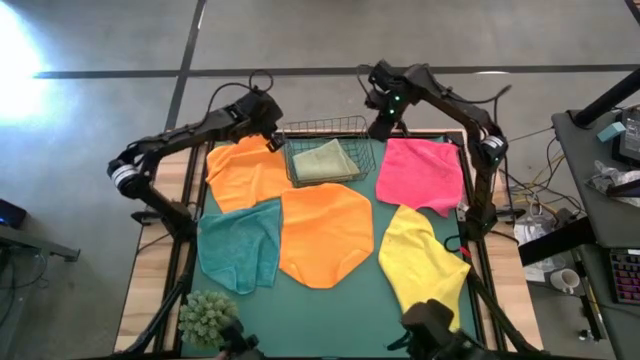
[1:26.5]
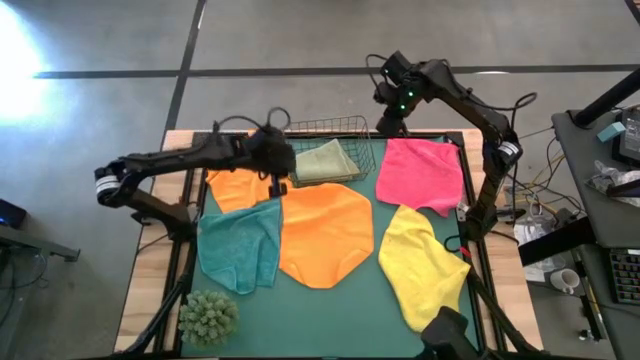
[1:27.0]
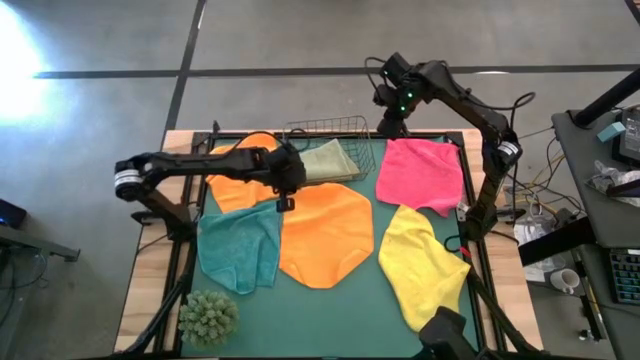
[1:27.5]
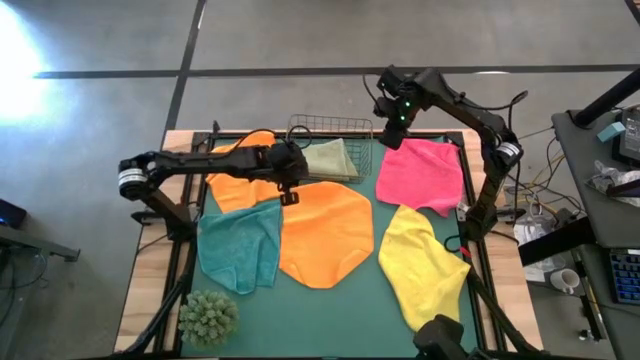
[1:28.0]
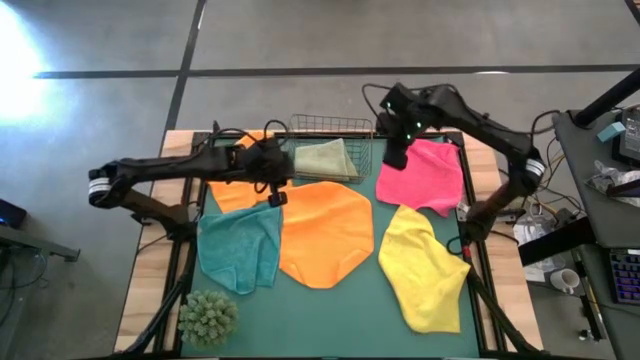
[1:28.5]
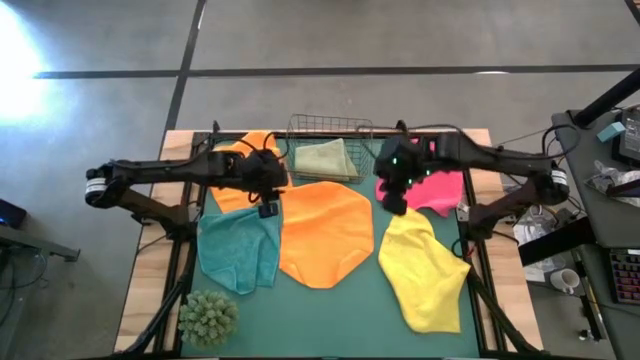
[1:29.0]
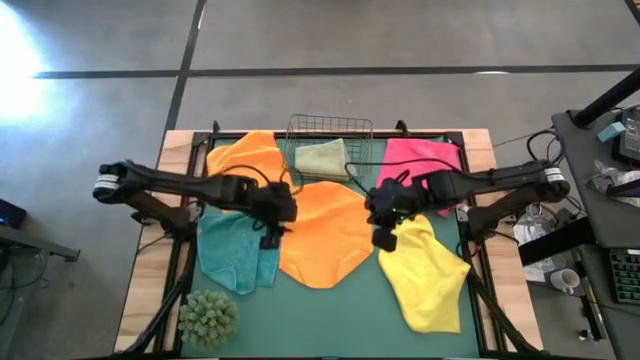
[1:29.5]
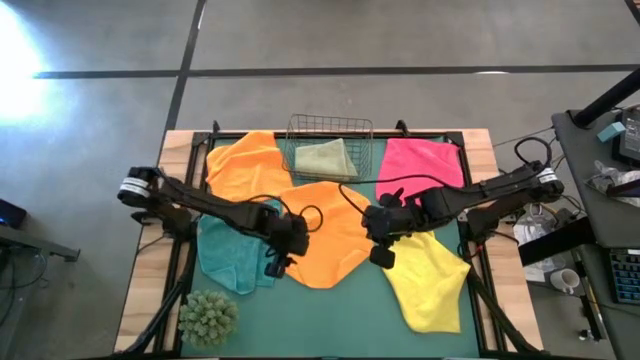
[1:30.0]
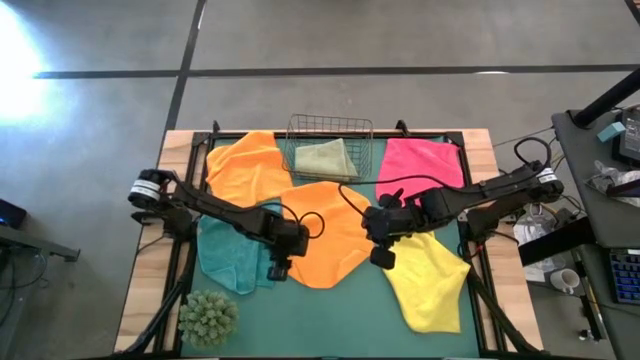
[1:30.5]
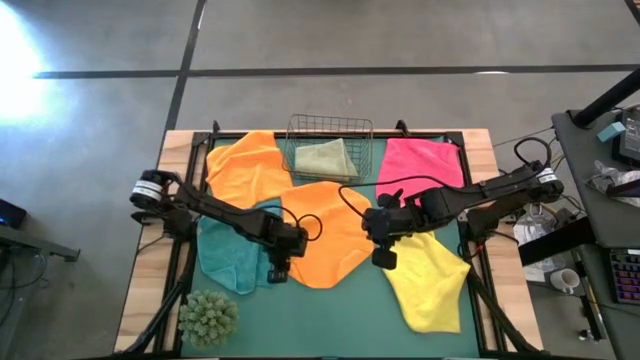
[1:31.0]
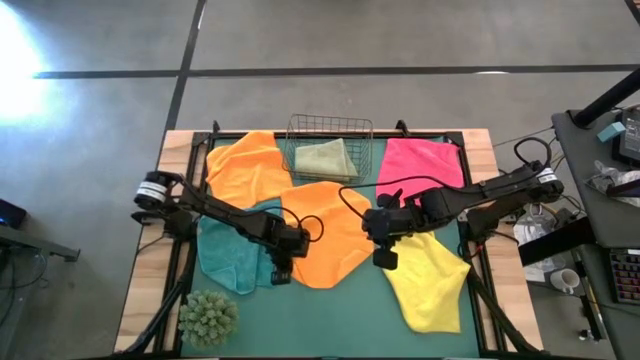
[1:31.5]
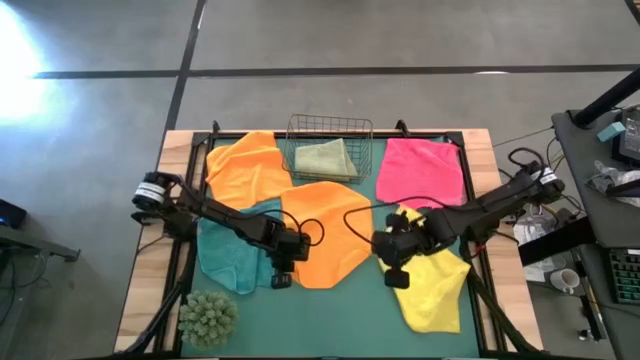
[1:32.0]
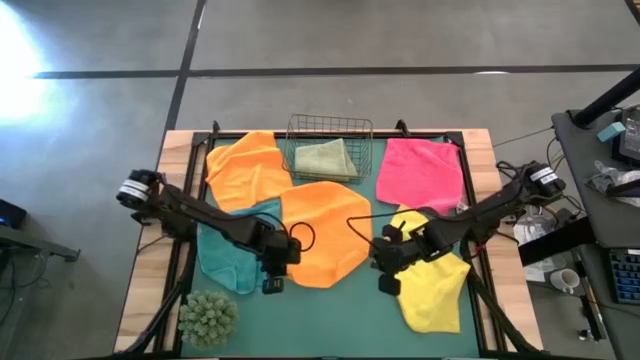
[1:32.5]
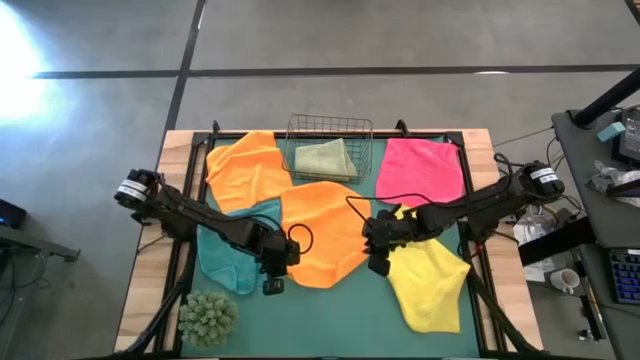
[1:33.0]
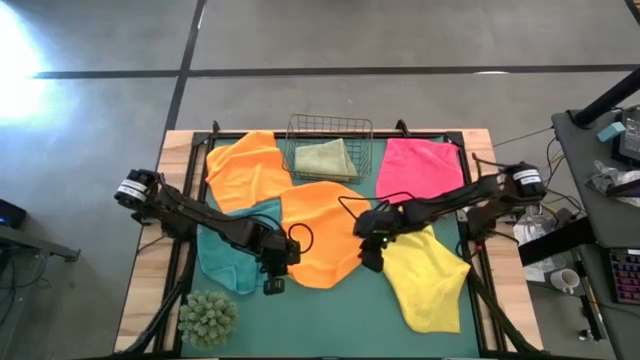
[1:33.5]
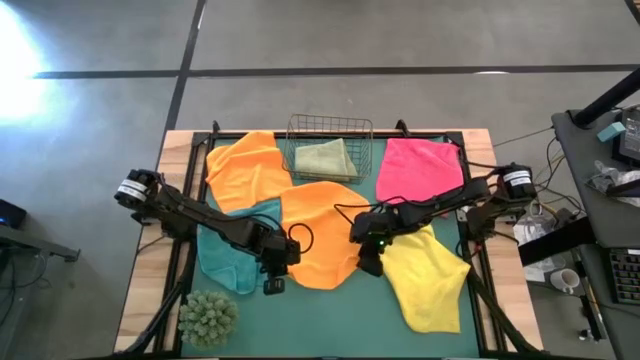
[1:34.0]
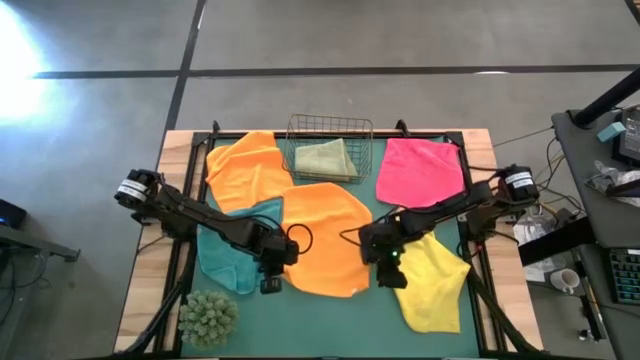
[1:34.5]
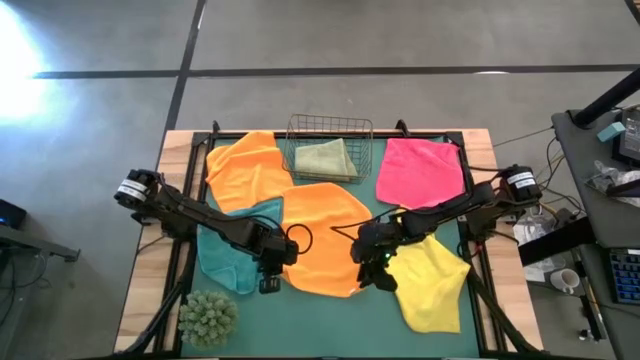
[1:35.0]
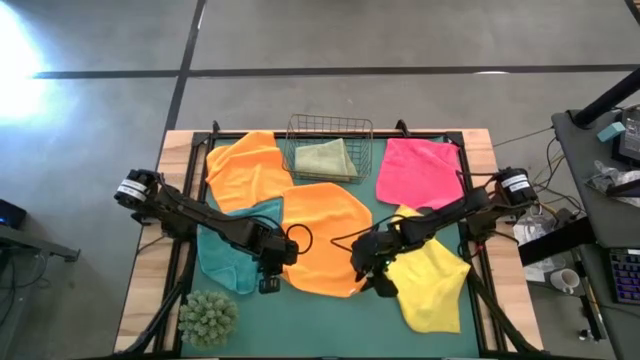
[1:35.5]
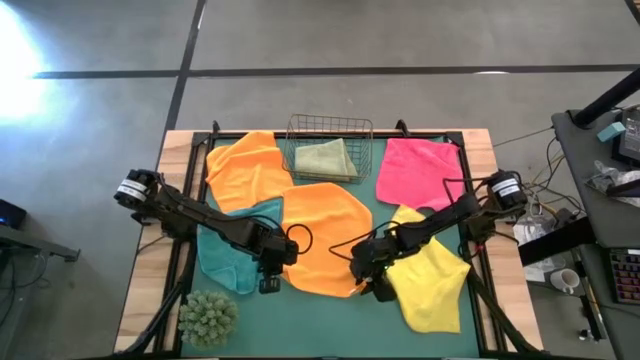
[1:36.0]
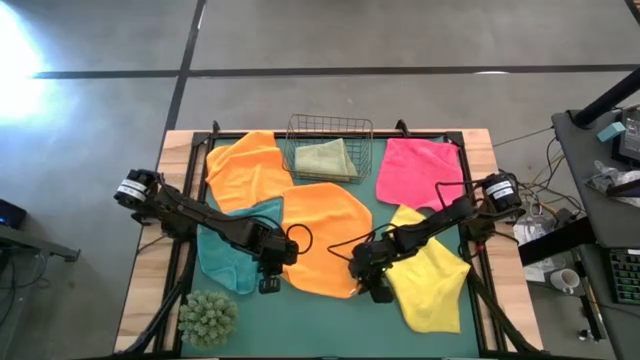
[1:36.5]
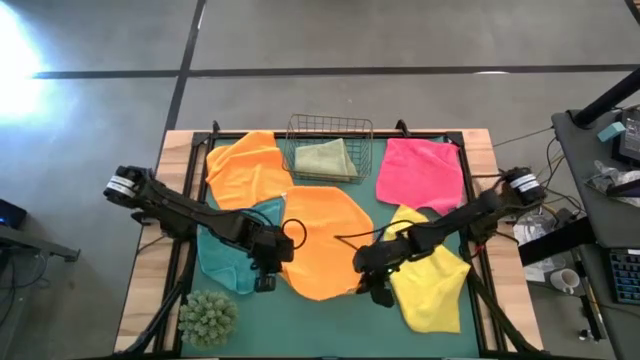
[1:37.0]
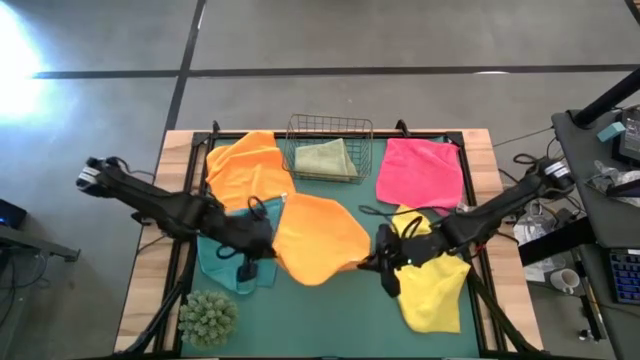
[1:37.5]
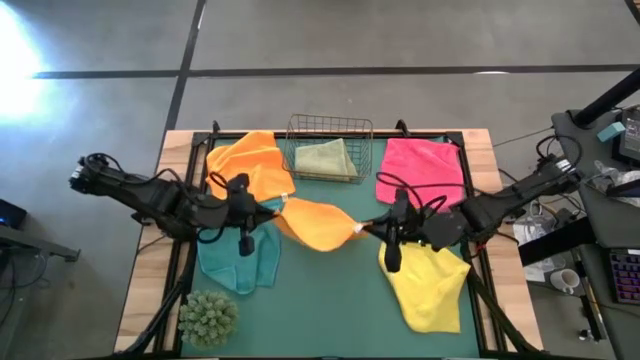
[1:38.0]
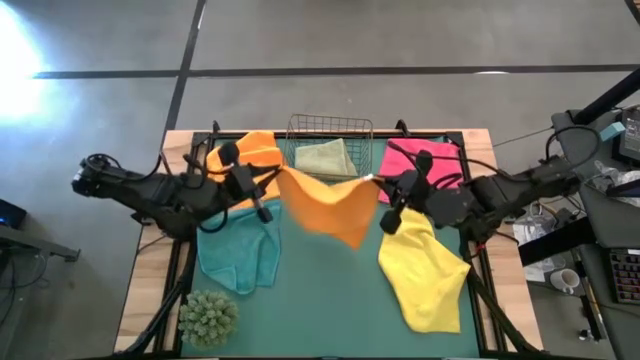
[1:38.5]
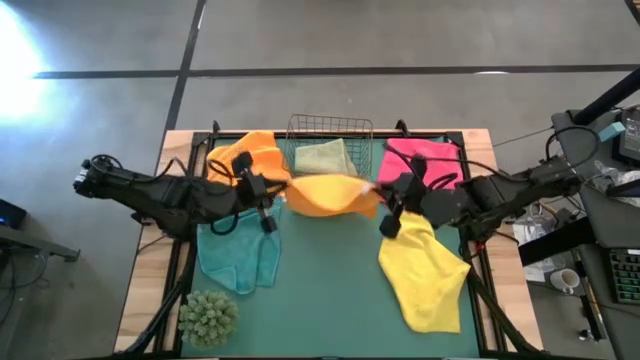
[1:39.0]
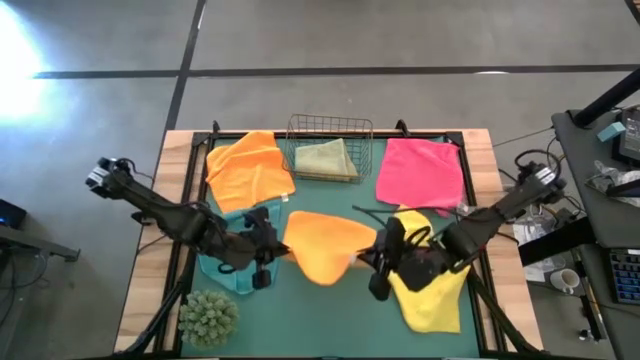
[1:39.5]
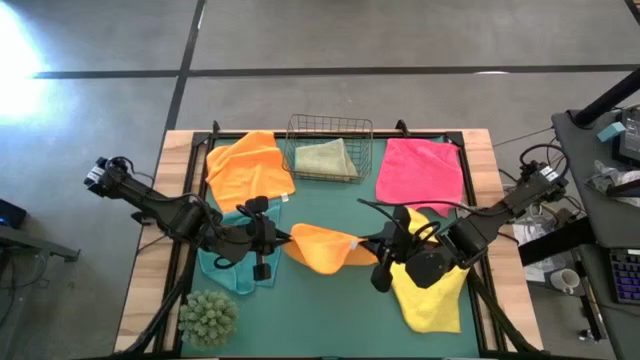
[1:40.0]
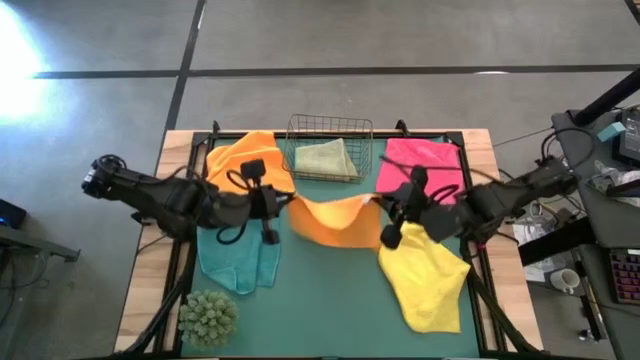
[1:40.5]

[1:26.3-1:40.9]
Task: Fold microfiber towels
Fold the orange microfiber cloth
